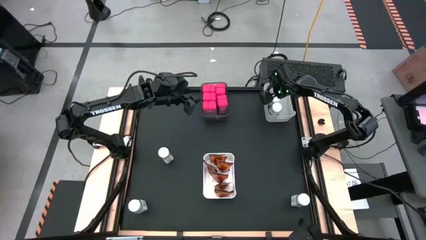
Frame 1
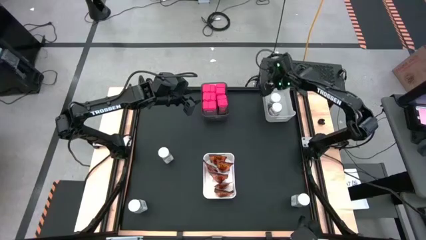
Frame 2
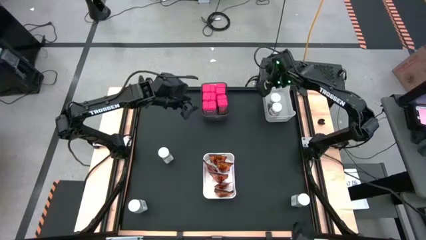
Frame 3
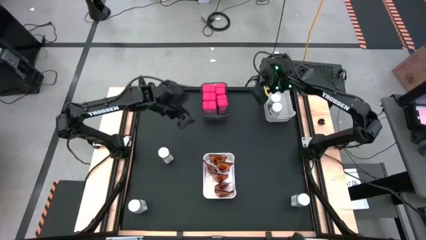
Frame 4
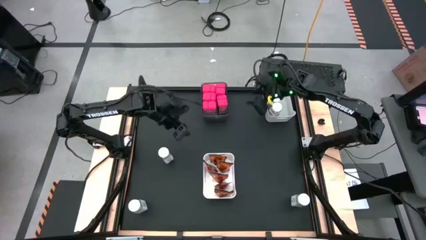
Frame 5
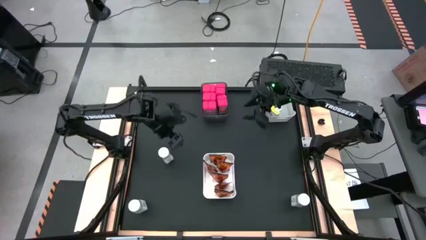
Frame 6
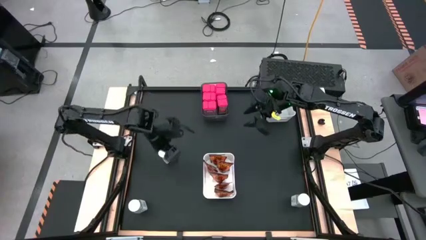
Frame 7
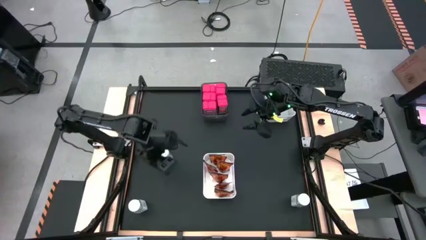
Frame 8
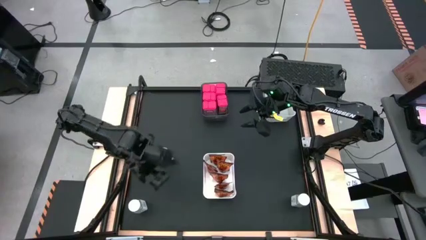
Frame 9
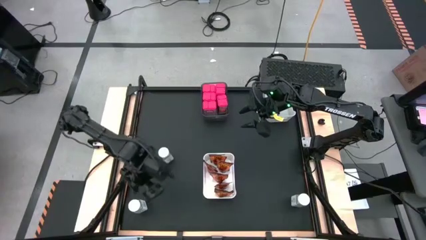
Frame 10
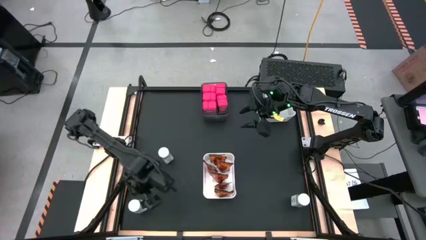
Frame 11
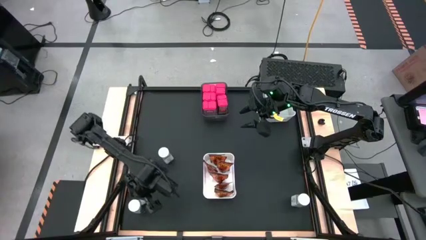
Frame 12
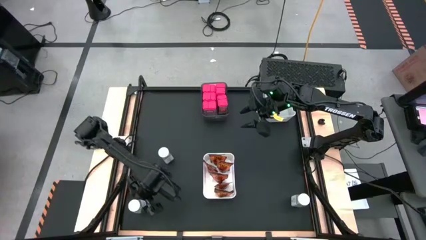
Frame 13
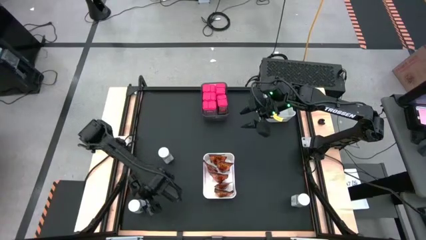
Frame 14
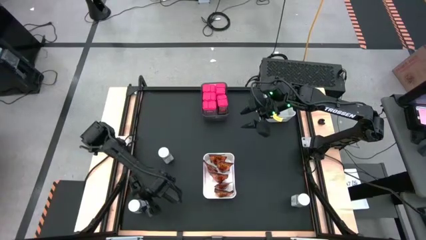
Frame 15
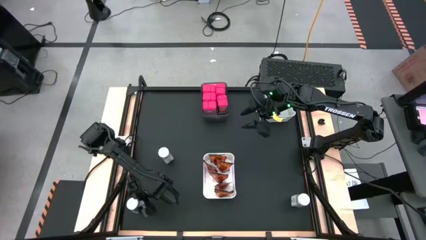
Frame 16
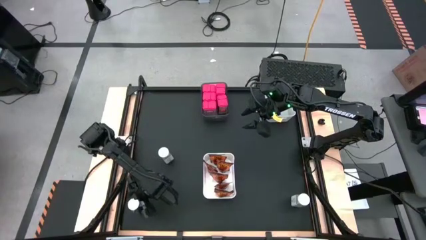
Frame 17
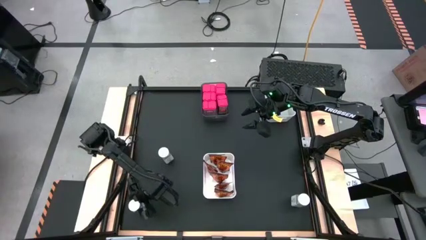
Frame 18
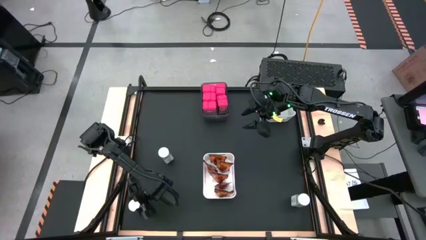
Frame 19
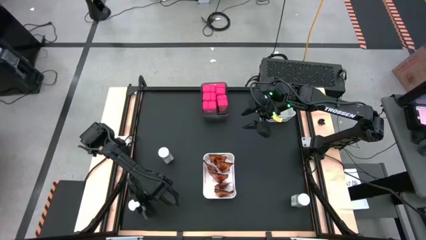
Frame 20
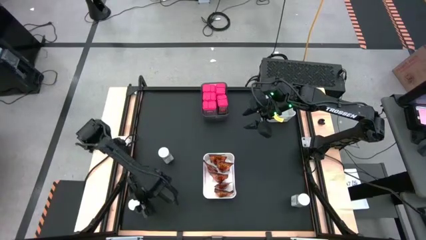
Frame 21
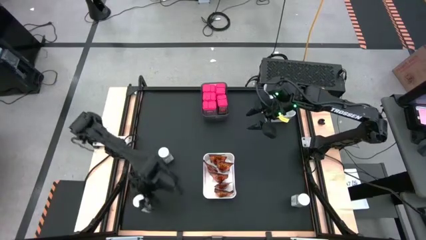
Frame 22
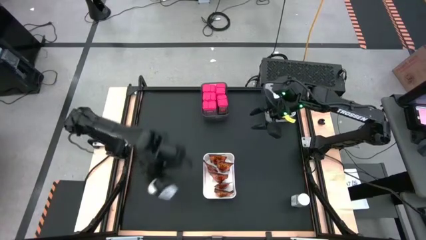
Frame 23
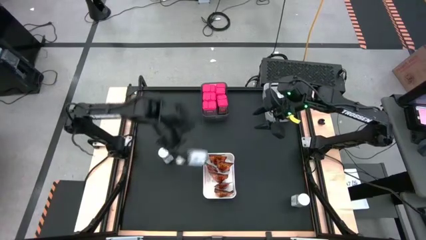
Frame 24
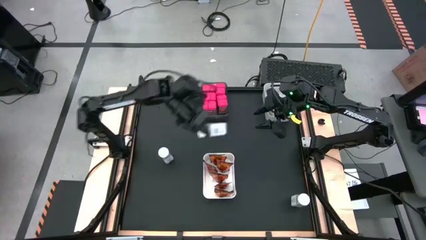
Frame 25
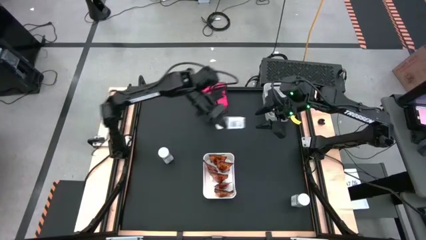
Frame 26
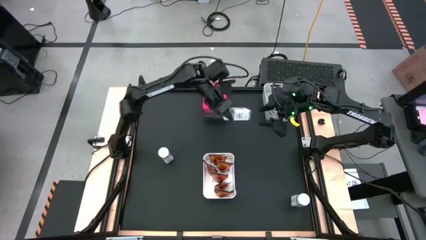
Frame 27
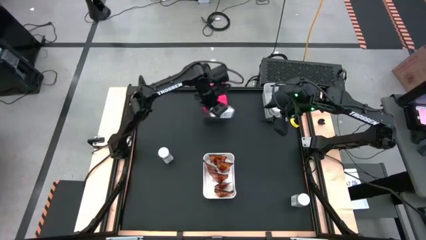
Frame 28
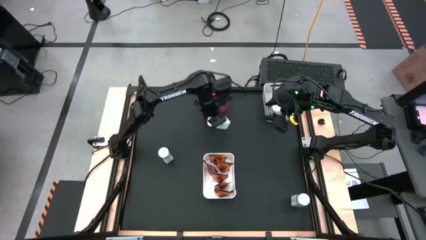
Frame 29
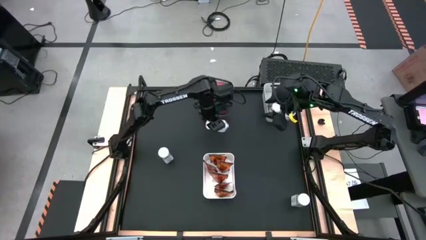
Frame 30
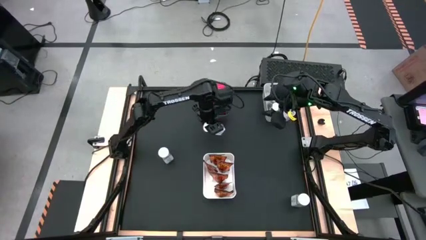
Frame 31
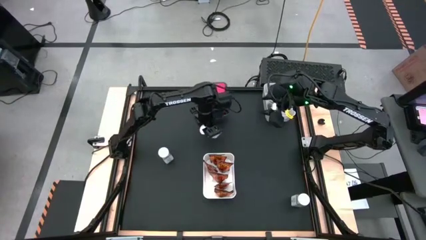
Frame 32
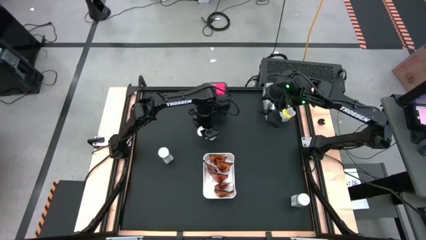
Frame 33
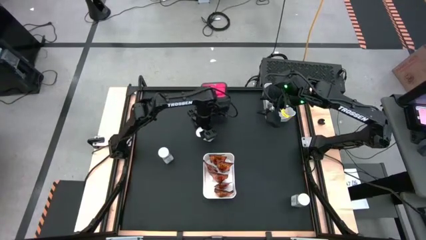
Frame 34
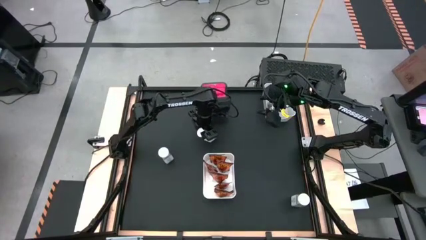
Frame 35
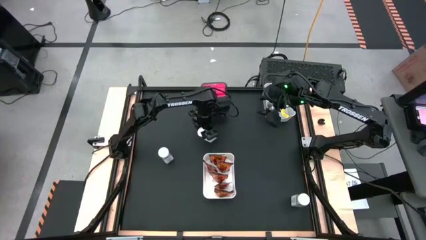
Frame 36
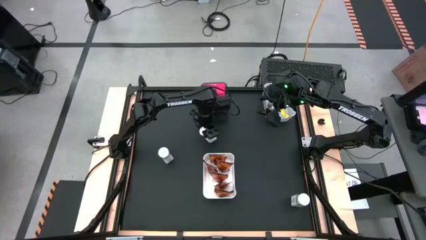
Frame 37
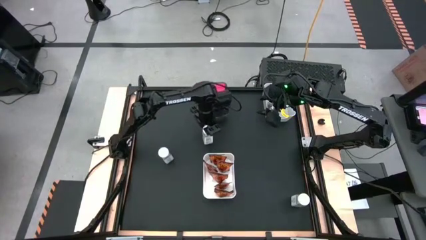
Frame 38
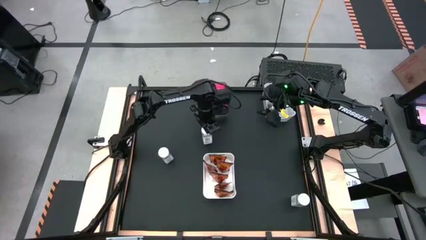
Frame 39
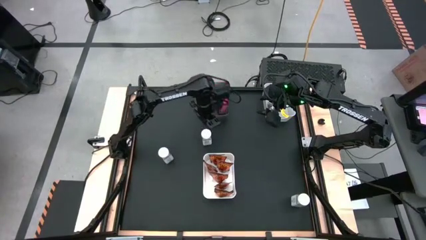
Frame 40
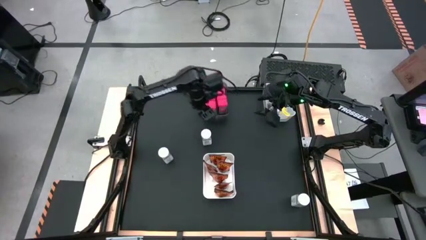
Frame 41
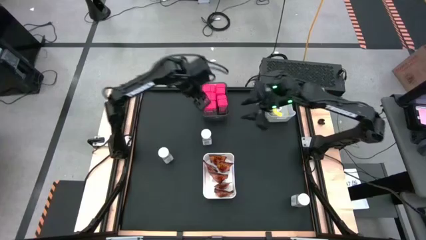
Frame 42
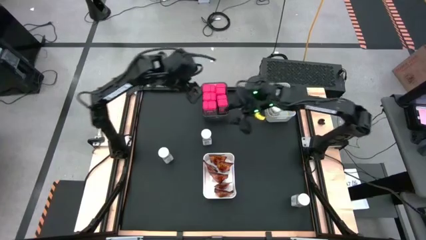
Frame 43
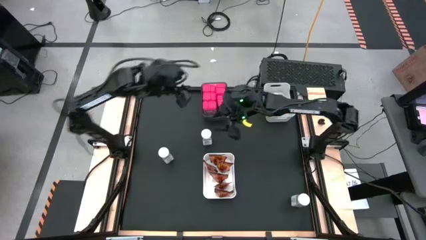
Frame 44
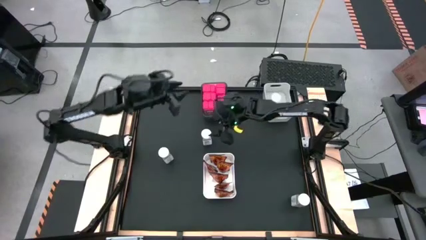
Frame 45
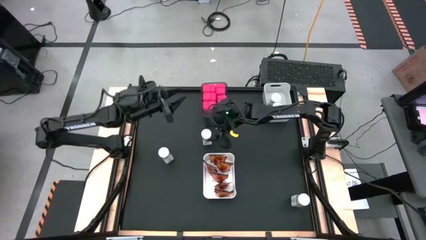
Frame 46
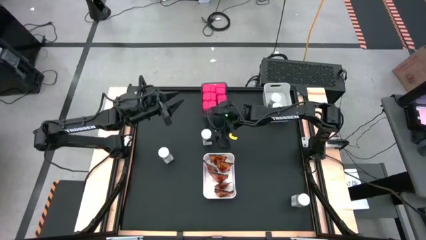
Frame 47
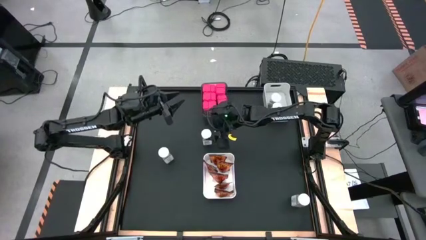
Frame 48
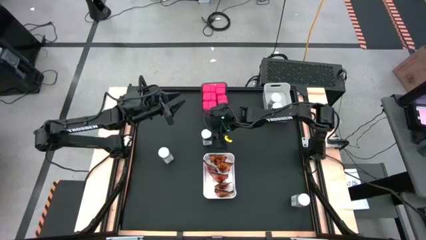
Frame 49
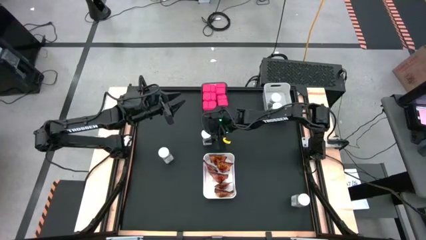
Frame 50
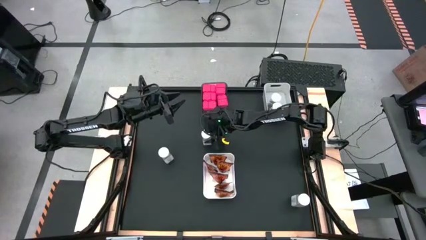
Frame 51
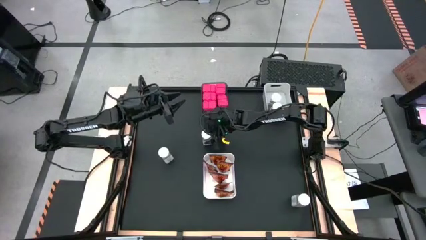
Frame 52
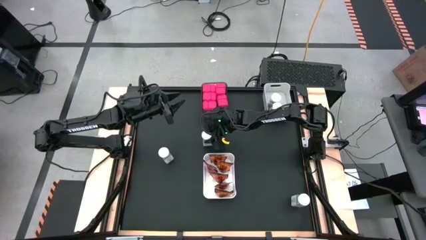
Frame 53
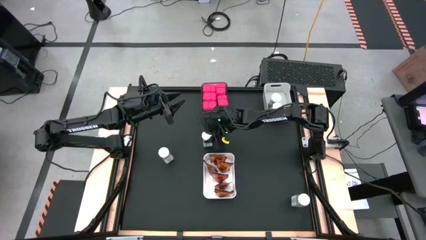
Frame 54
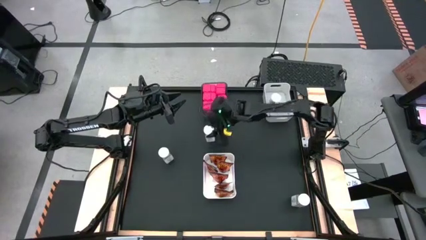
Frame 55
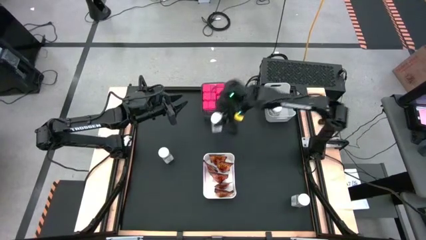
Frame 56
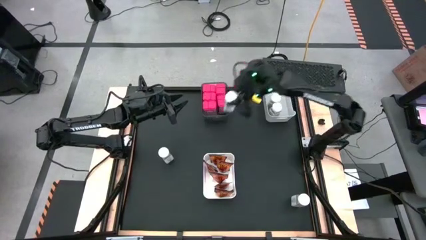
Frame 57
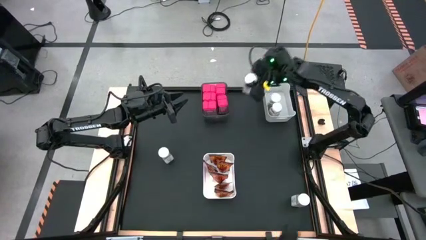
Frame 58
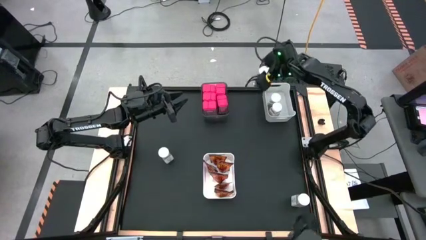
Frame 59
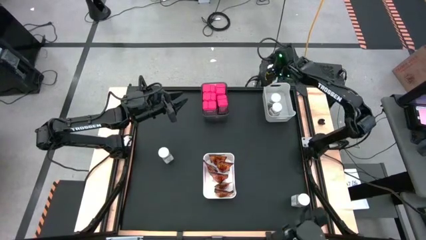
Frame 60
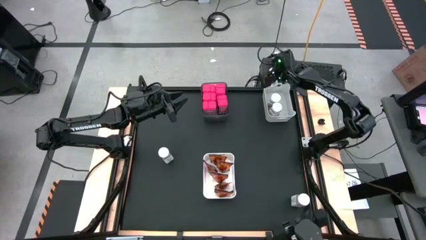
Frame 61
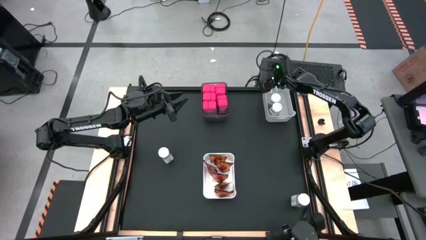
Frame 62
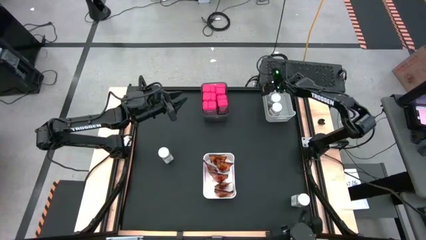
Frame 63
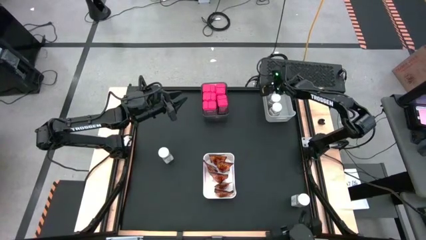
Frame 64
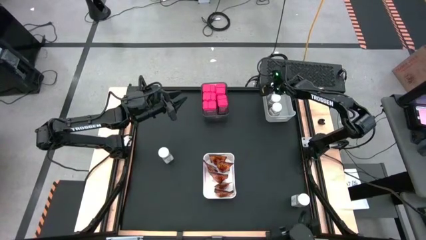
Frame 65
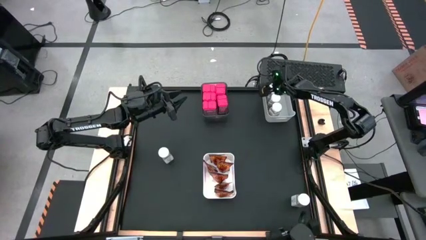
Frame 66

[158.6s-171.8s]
Task: Sort spices by type
Put the white seasoning bottle into the gray bin

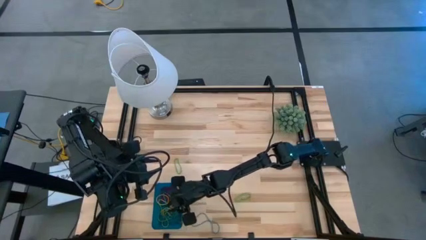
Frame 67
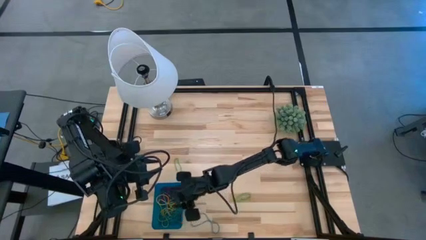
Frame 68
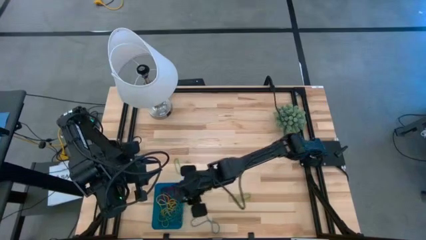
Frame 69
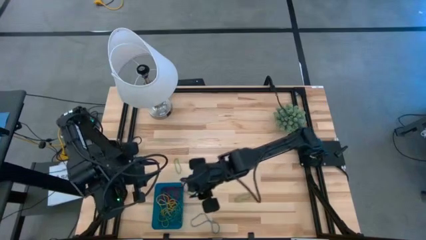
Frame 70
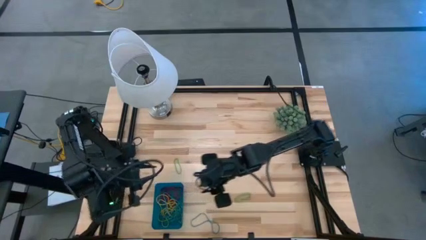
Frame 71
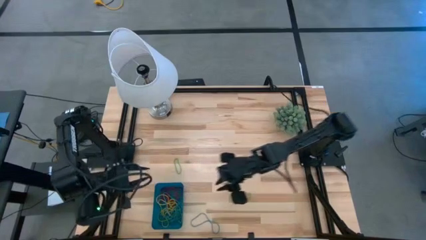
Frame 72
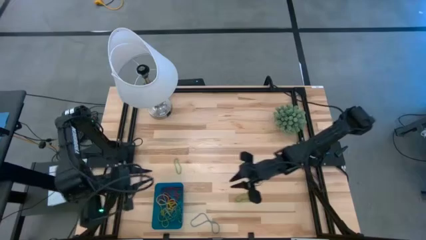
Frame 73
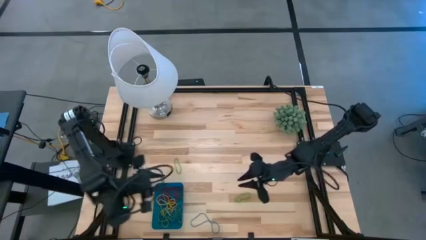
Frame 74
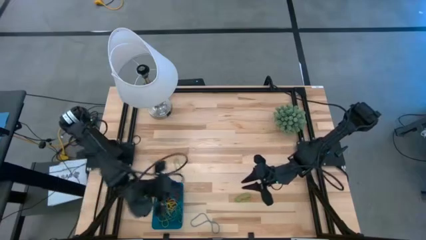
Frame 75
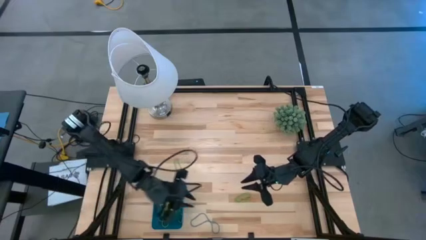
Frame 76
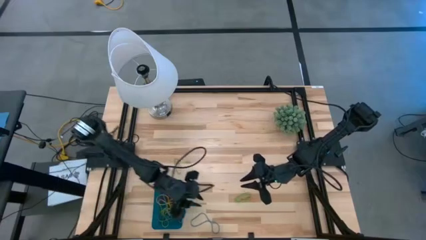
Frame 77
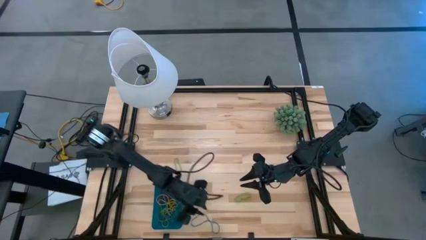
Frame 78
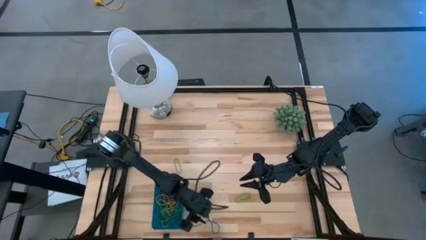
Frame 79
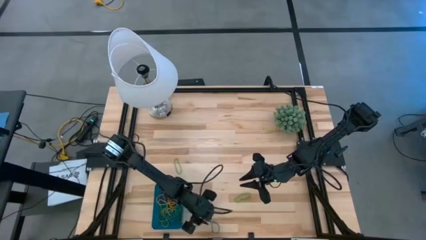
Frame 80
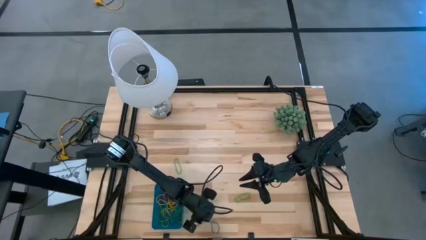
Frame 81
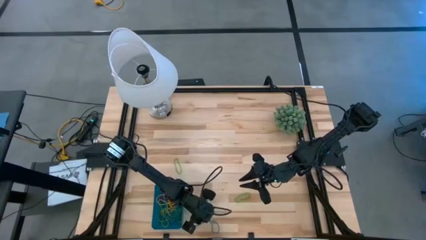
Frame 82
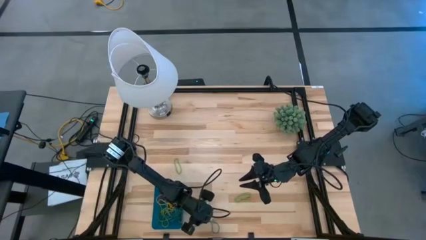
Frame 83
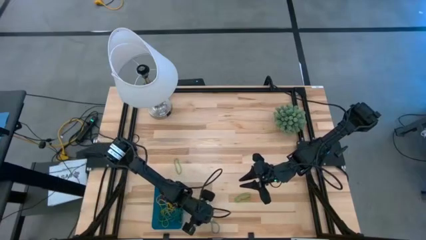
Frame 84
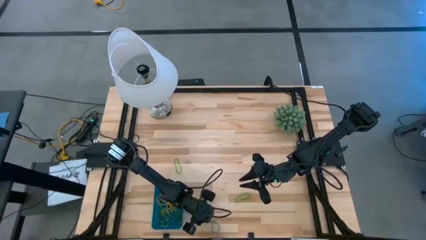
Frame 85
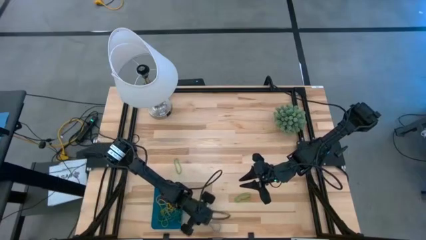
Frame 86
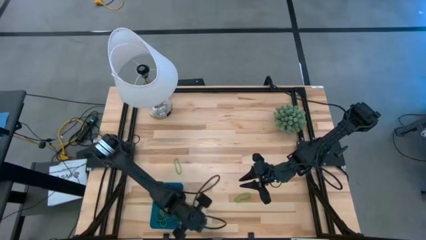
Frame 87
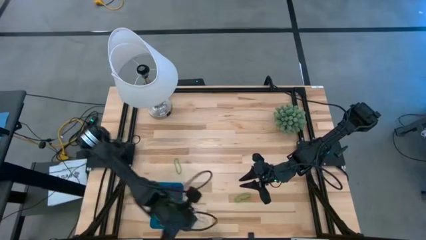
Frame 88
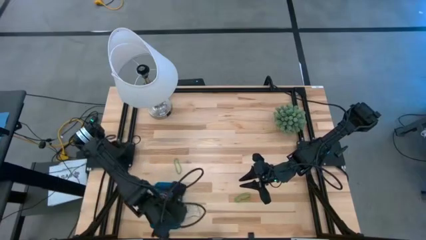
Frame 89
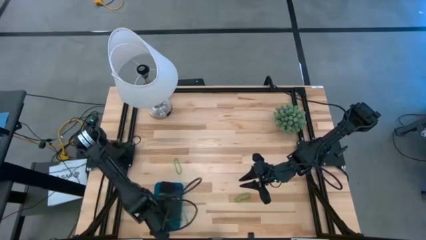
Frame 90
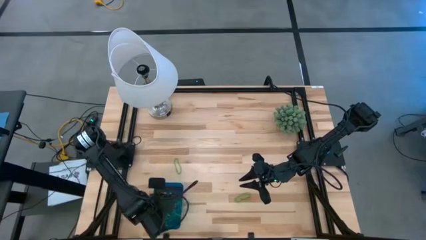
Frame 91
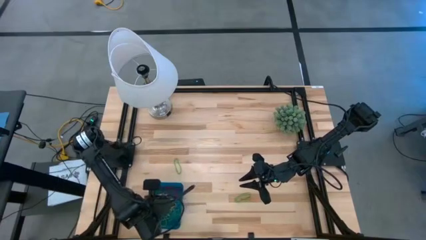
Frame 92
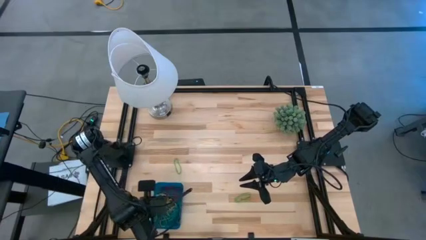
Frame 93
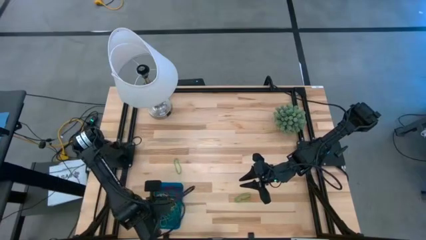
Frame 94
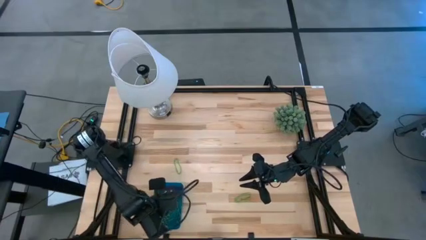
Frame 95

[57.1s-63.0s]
Task: Pick and place items into bin
Put the blue rubber band into the blue bin
